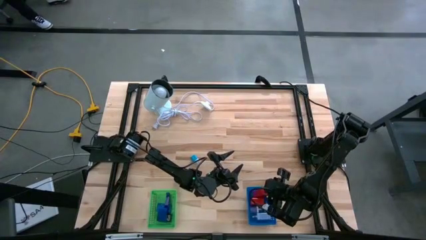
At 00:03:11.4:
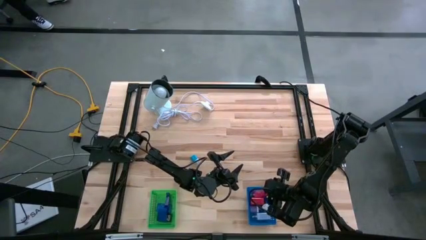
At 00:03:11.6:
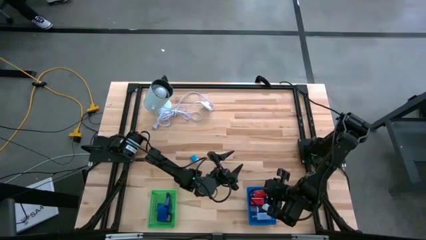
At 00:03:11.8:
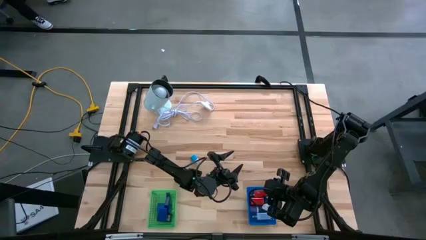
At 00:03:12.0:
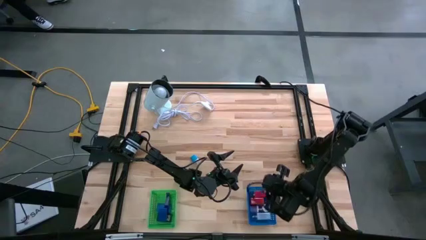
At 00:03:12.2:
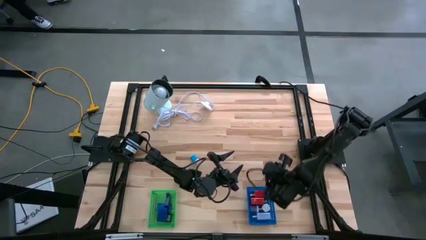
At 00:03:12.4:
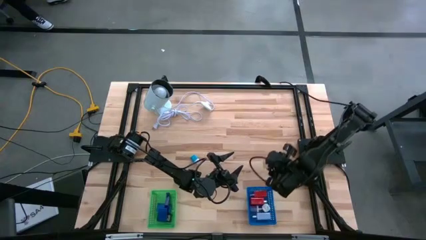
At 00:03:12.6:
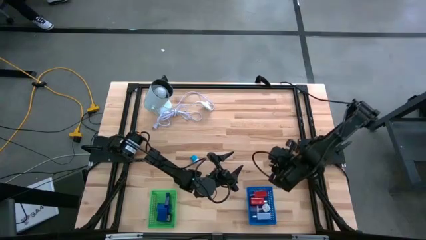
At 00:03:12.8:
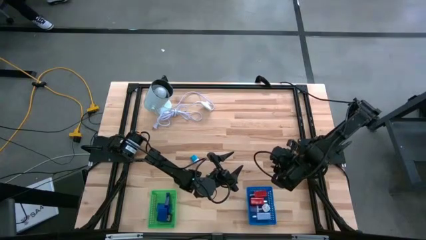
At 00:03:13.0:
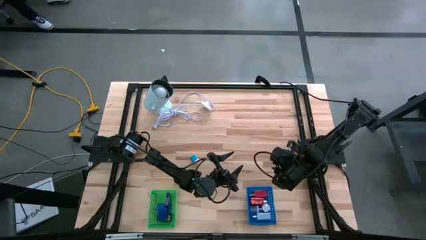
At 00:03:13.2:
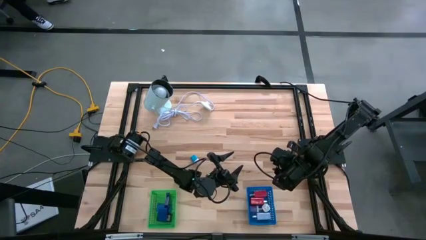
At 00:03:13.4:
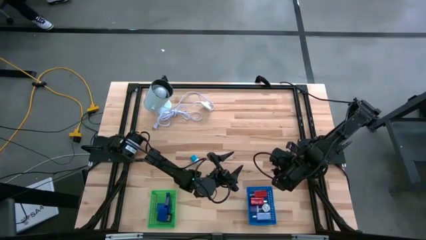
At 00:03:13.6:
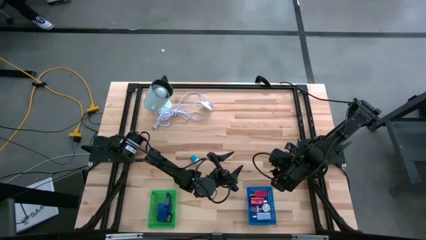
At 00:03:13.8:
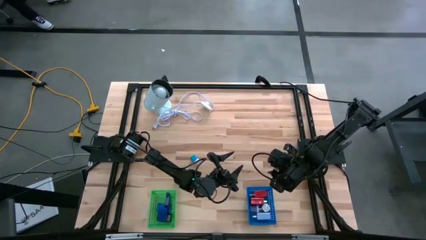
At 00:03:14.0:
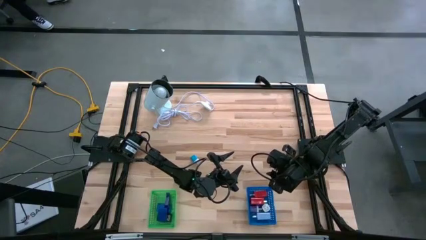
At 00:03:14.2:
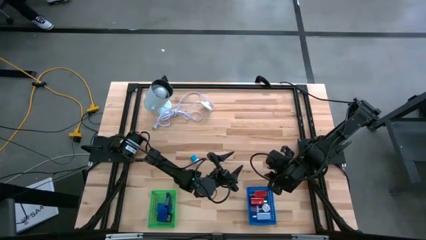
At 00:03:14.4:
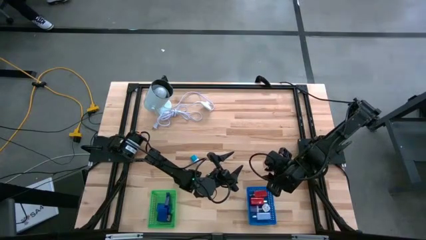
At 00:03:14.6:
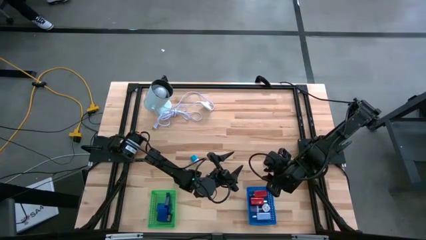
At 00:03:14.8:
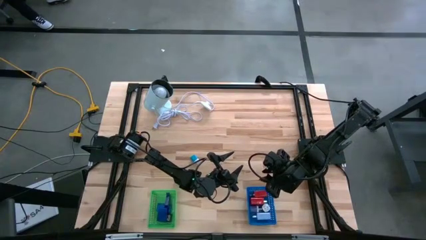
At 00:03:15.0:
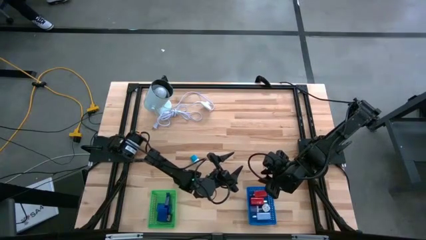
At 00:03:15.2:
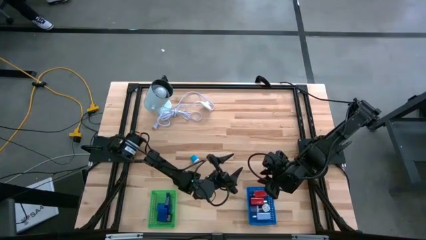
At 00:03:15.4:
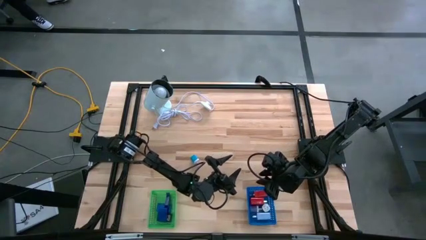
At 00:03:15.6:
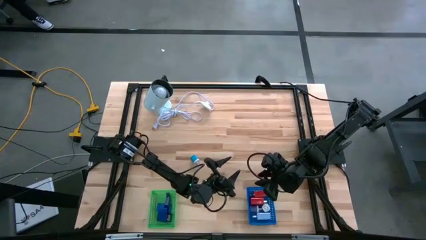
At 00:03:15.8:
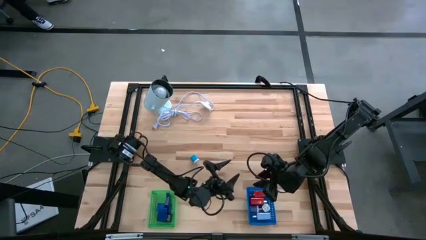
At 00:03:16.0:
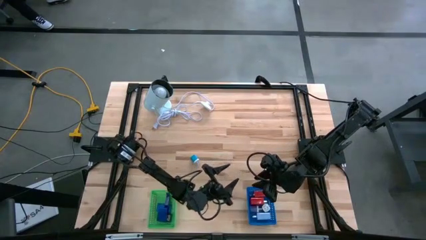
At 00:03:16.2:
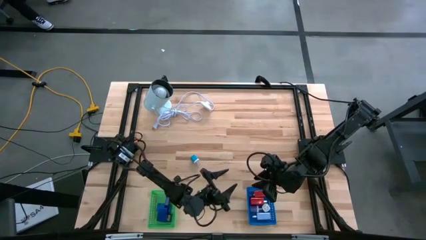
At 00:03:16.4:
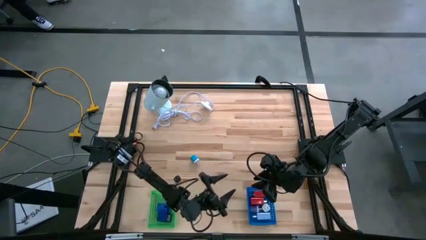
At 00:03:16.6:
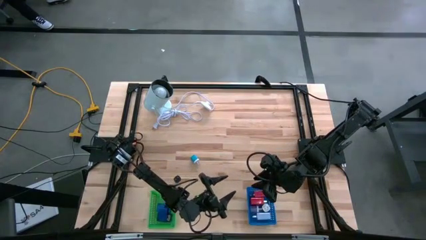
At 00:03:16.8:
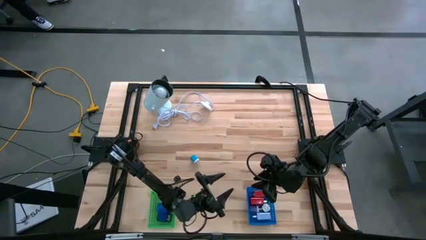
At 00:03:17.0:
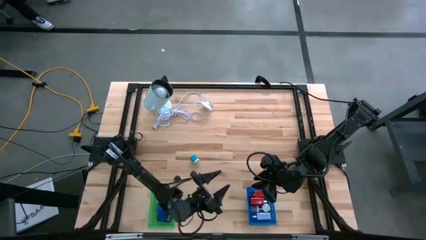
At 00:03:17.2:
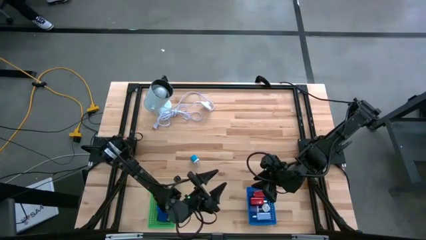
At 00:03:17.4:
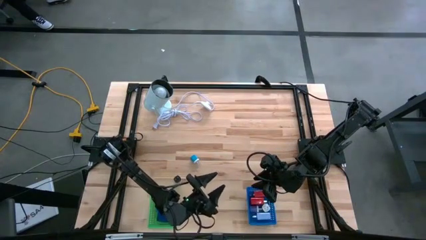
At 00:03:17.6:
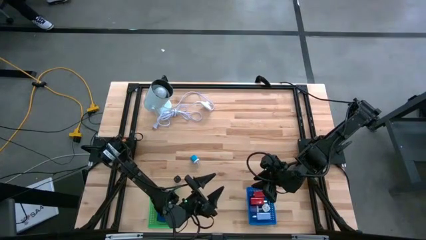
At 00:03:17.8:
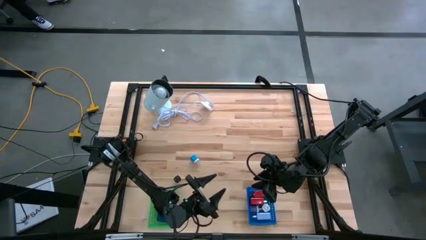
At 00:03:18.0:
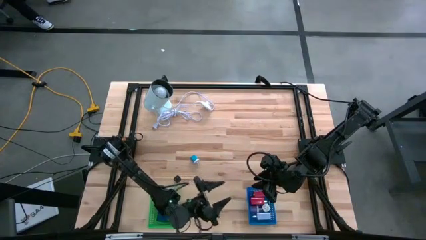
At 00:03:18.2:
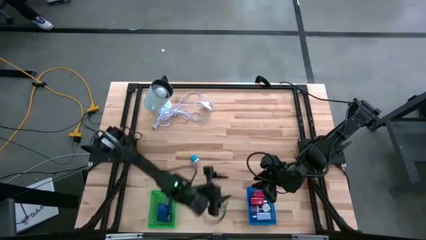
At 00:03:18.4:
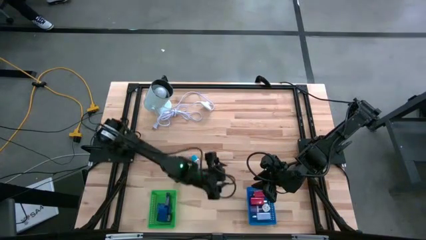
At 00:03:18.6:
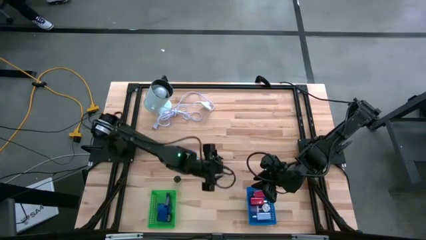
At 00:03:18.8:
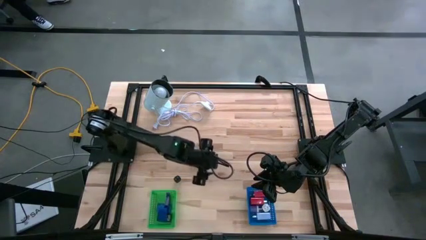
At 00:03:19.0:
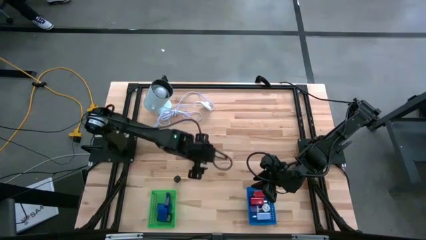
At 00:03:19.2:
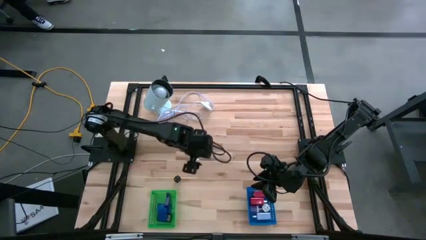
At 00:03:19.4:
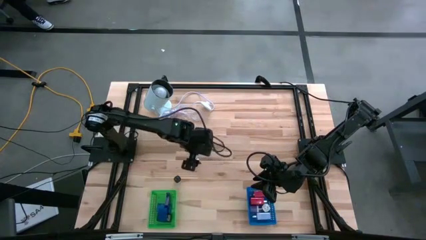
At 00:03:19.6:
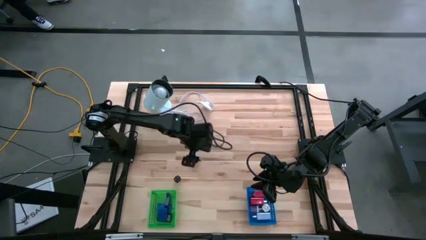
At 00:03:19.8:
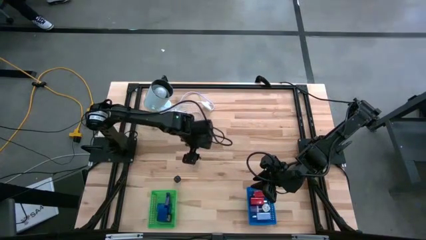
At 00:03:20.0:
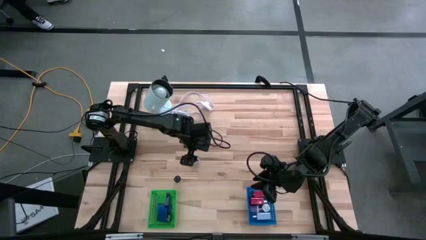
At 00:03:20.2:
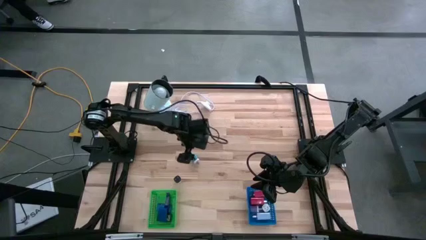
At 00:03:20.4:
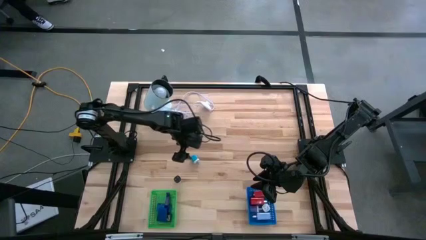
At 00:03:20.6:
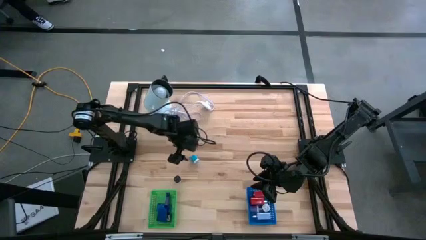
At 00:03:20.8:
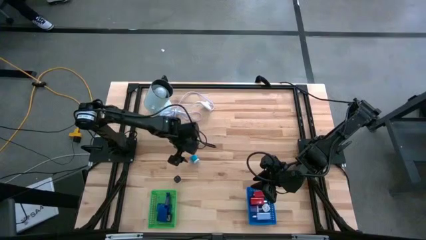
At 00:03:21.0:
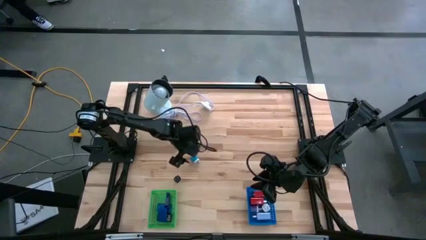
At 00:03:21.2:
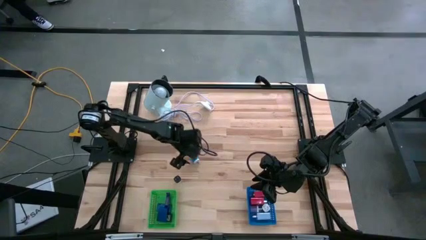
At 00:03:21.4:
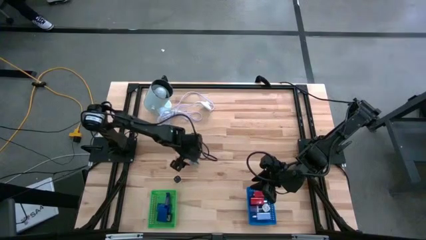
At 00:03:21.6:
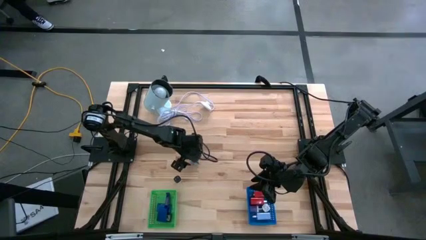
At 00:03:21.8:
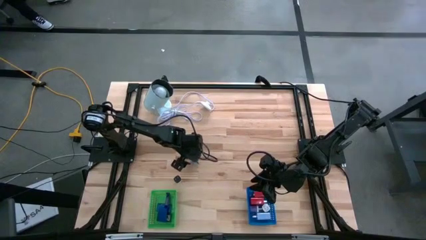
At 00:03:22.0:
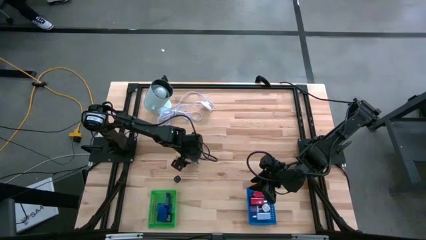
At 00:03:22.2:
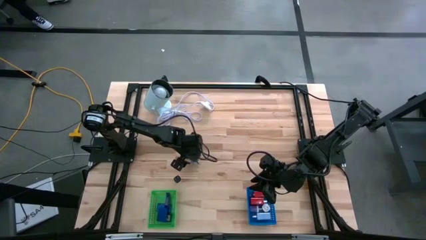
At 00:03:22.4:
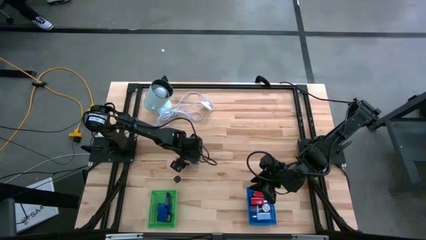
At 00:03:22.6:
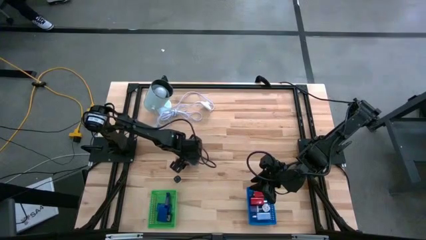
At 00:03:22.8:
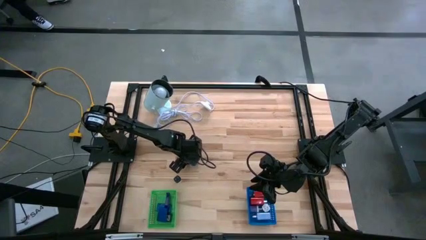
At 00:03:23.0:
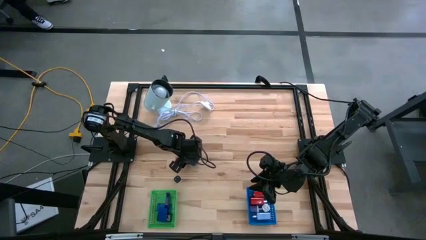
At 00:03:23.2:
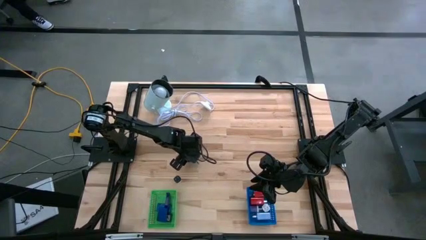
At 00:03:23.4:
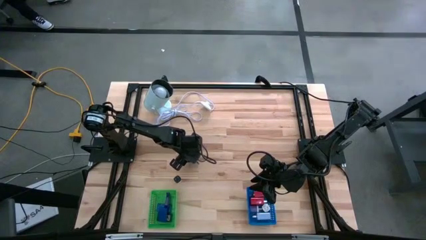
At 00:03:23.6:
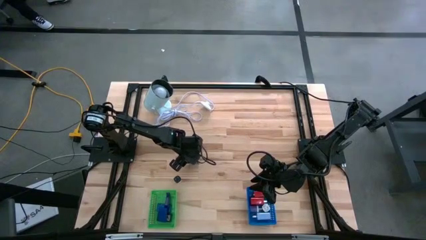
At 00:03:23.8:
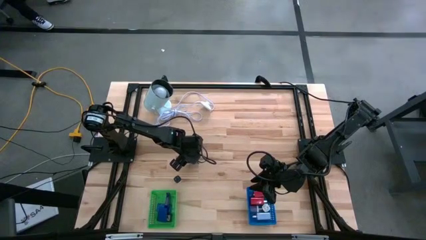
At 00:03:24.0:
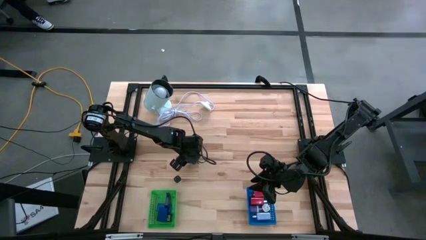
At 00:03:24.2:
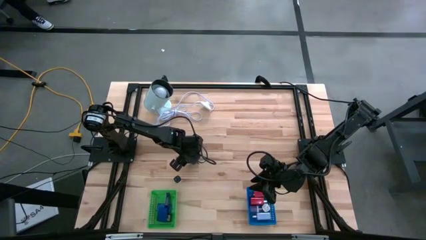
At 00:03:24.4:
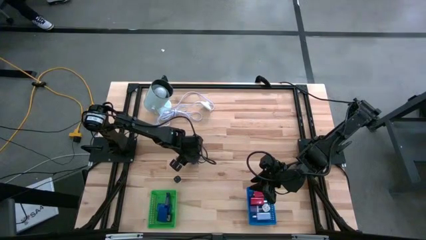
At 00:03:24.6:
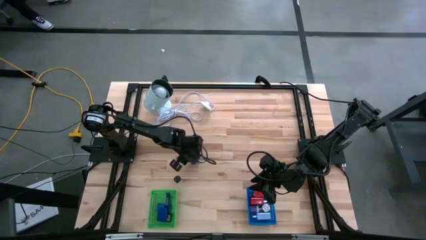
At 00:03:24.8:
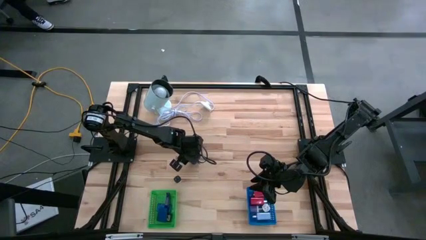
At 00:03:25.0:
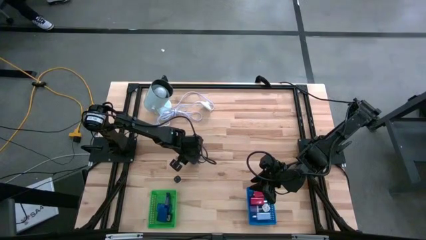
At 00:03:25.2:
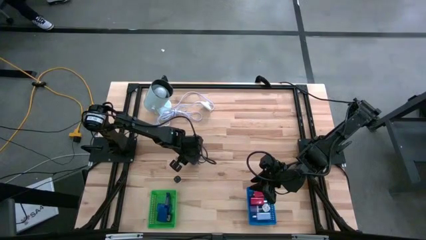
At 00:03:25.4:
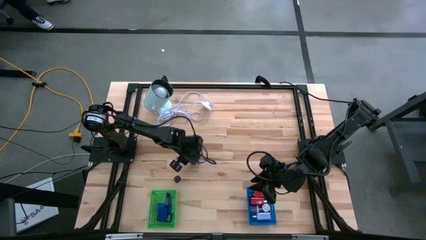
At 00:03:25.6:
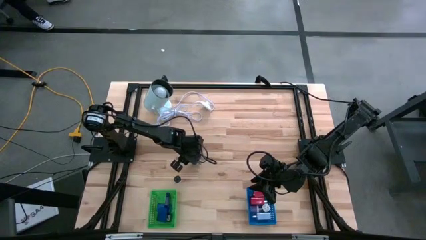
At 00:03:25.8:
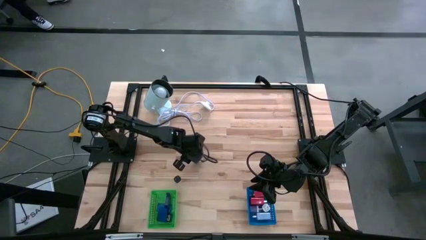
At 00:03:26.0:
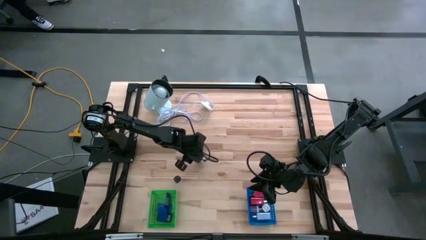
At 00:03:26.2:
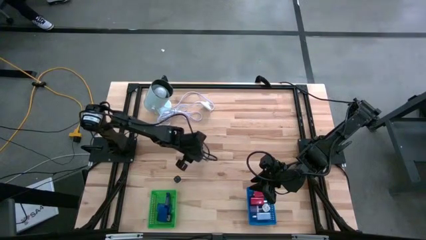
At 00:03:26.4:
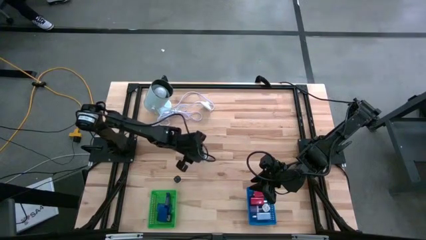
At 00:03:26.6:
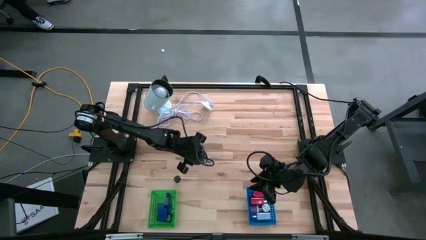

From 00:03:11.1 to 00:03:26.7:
Task: Pick & Place Office items
Put the blue charger adapter into the blue bin
